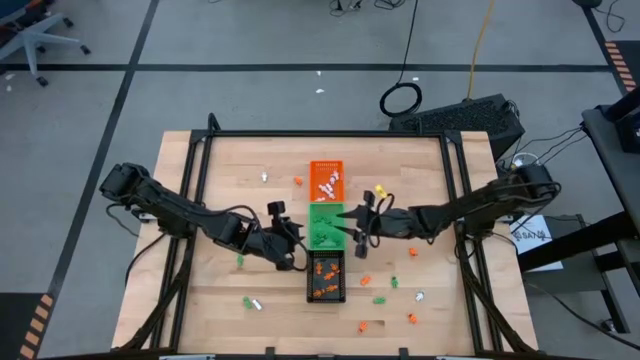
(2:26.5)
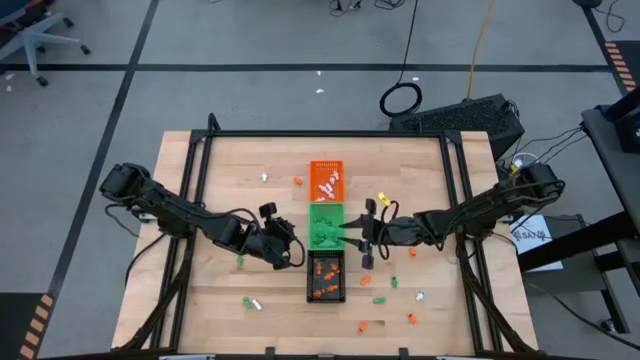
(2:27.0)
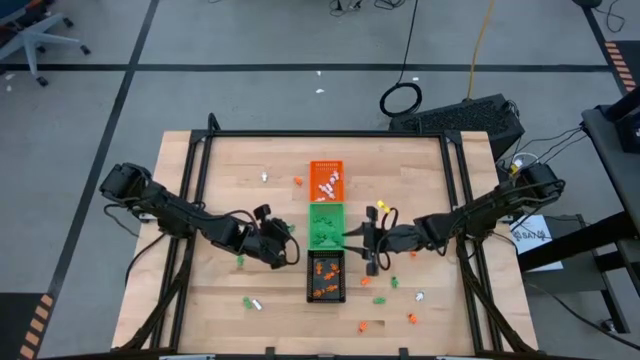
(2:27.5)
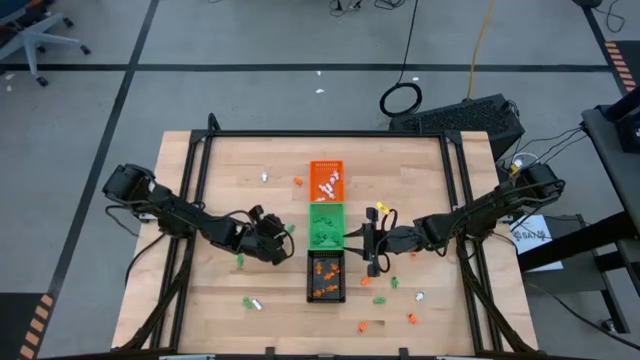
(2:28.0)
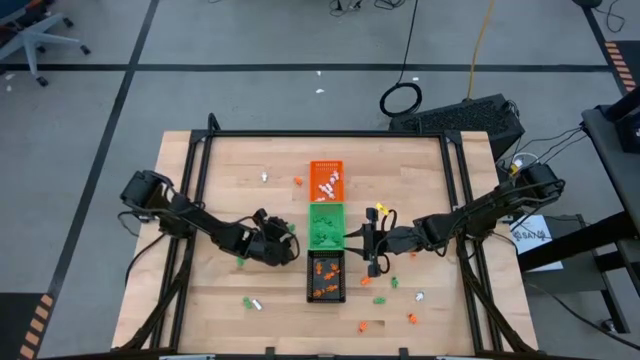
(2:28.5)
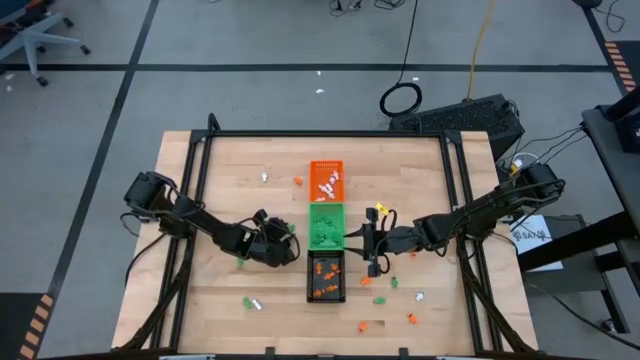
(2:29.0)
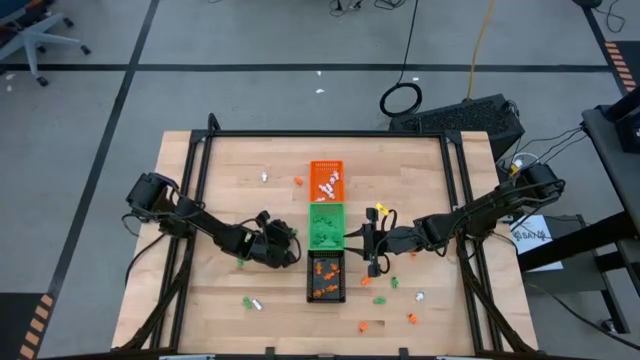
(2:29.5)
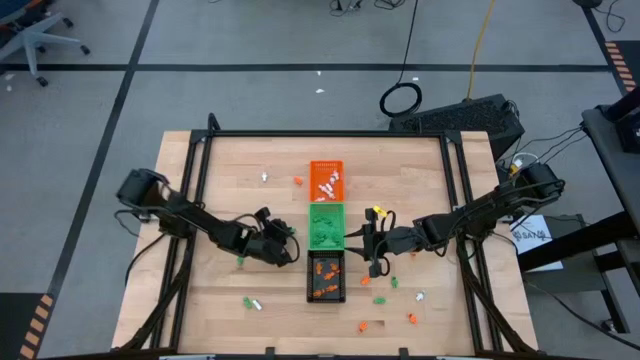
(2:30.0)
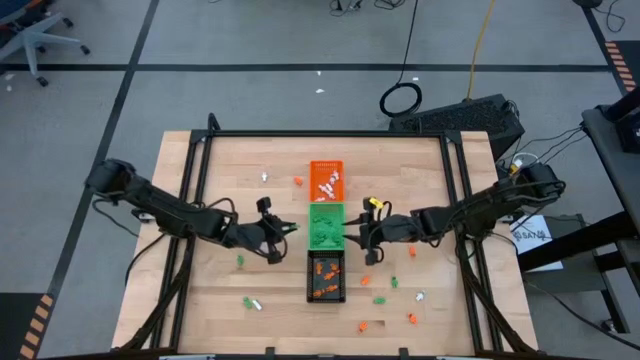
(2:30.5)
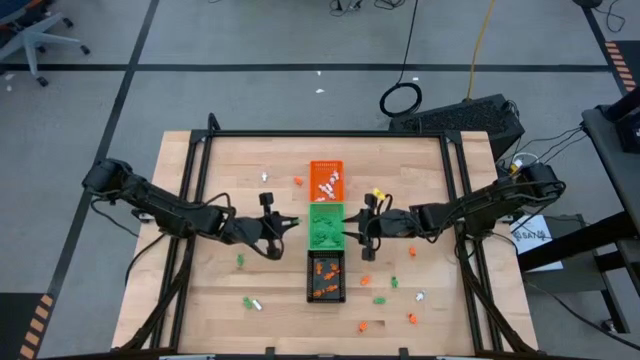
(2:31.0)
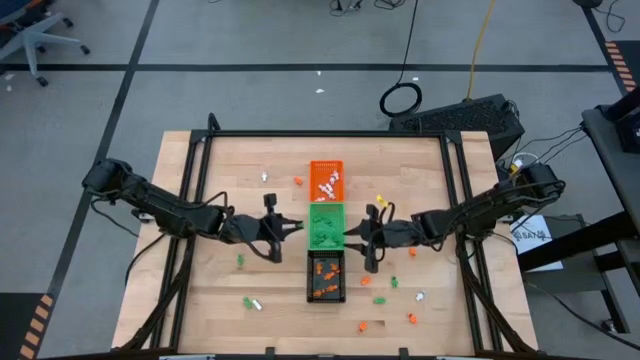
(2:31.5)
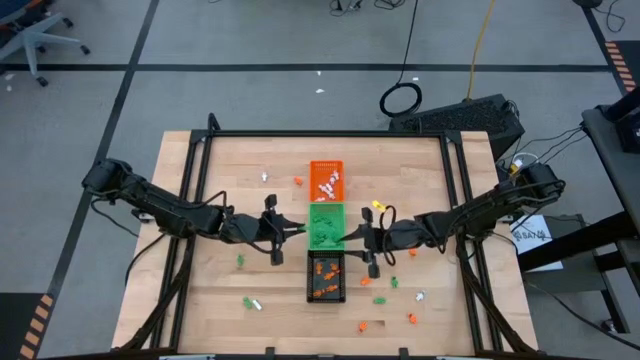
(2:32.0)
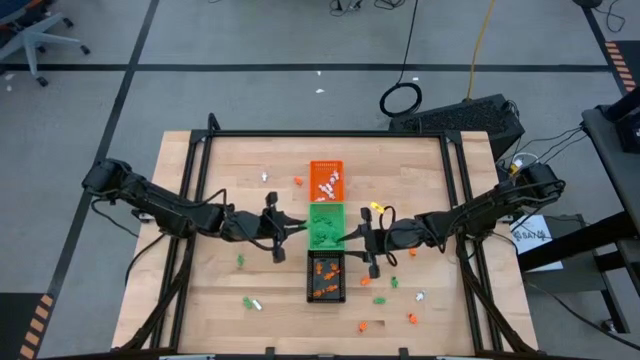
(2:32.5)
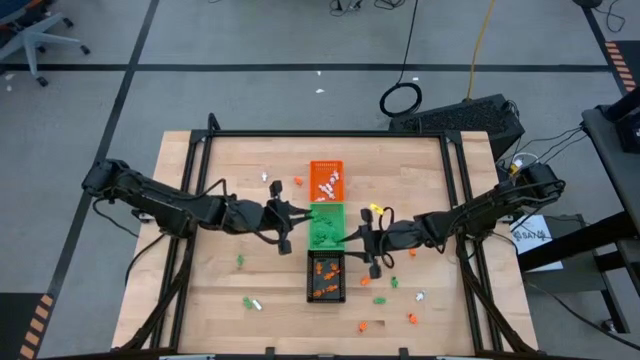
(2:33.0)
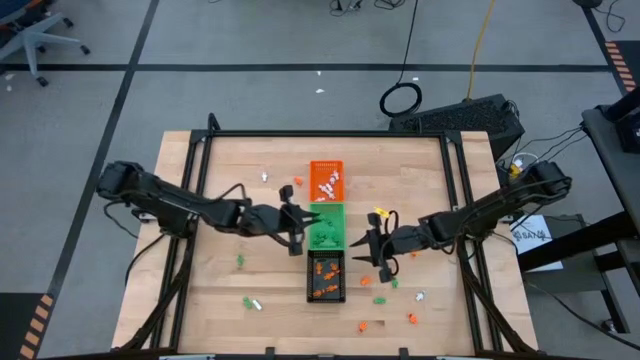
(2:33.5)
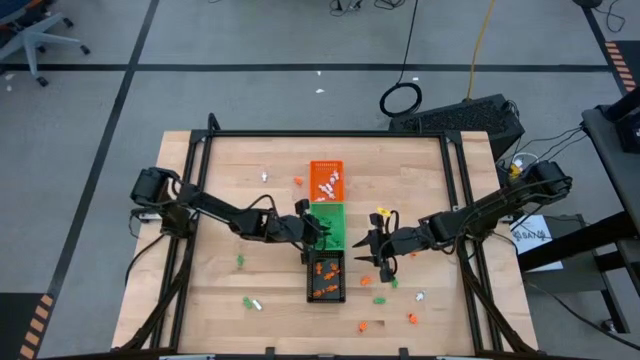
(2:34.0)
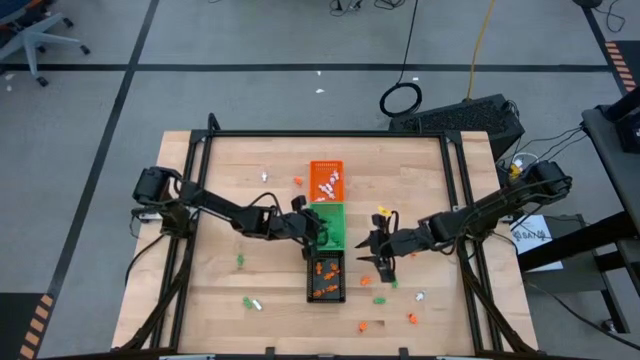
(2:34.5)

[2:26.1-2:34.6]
Task: Sort Halloween decoration
Put the green skeleton toy into the green bin

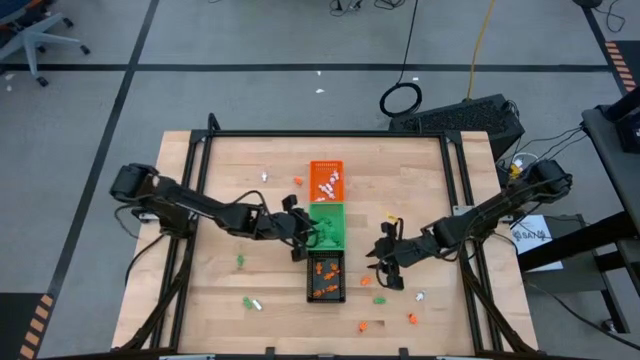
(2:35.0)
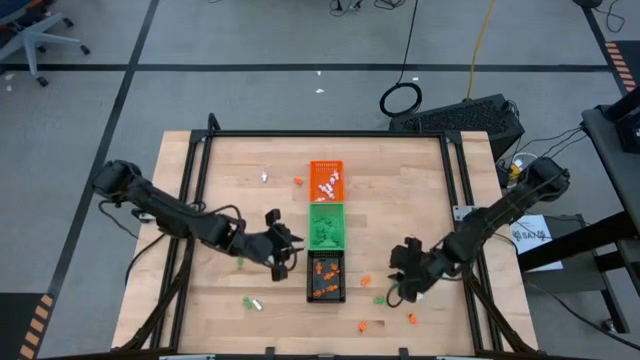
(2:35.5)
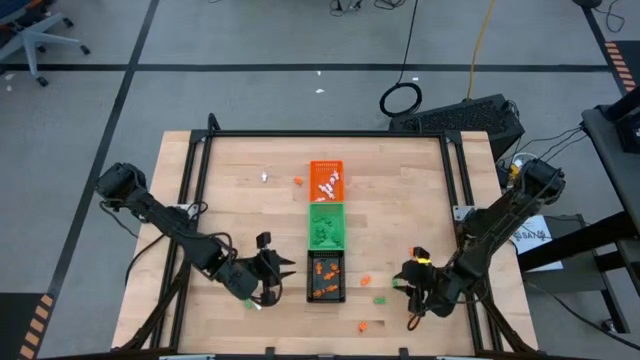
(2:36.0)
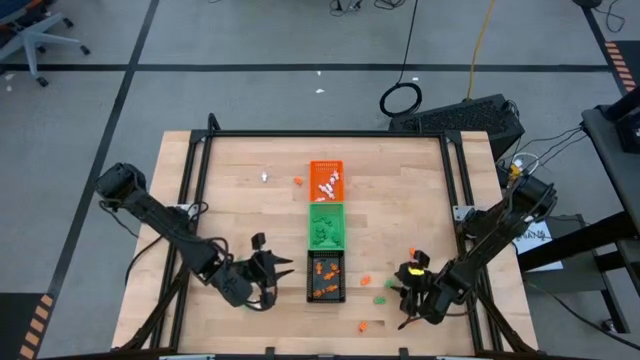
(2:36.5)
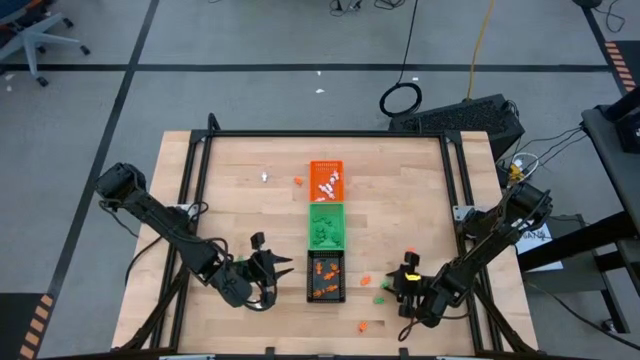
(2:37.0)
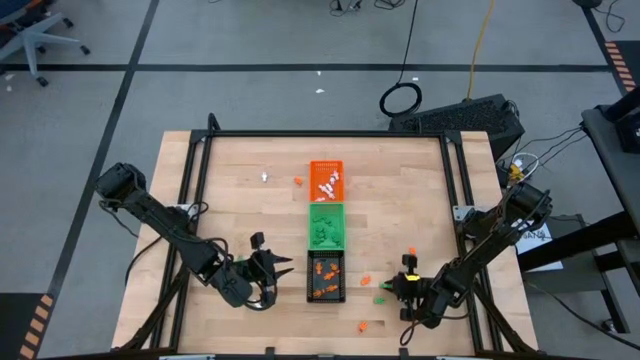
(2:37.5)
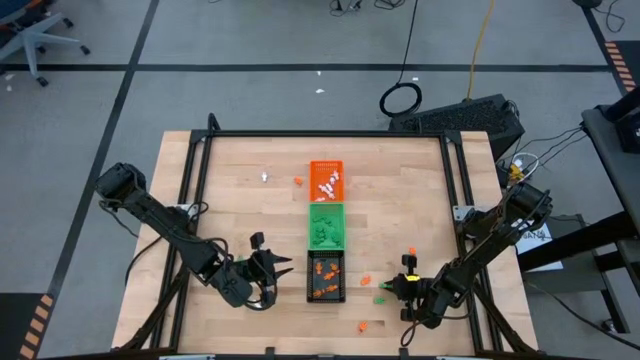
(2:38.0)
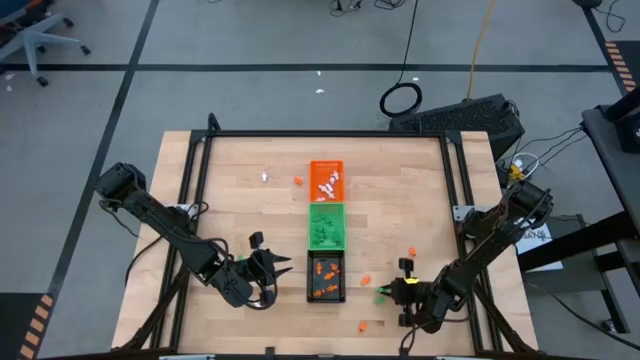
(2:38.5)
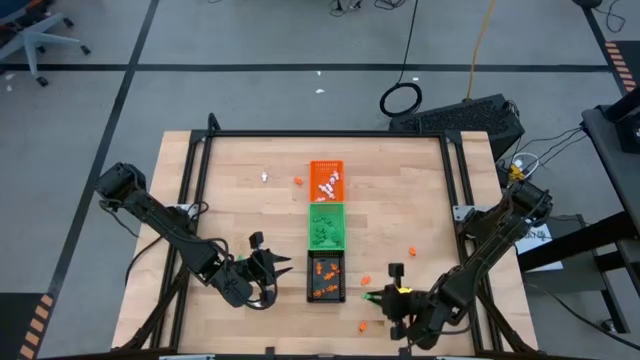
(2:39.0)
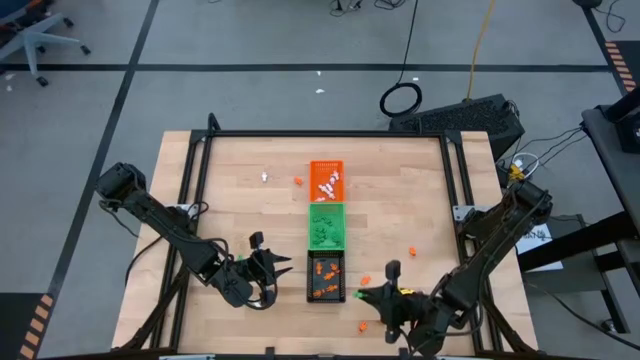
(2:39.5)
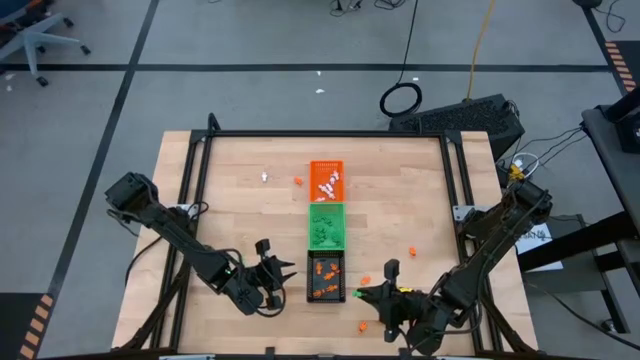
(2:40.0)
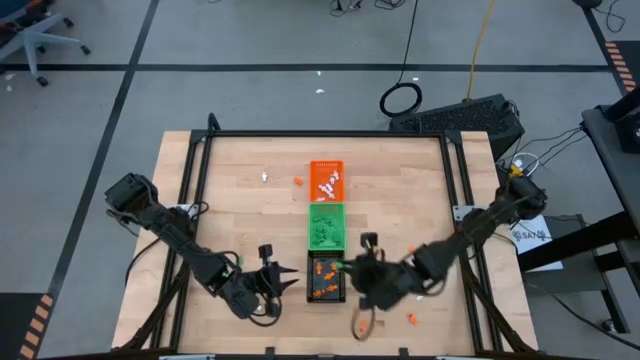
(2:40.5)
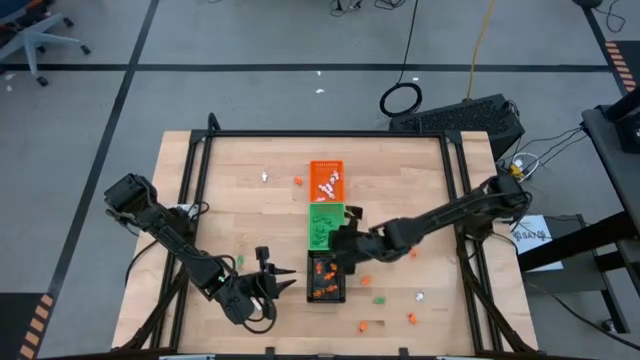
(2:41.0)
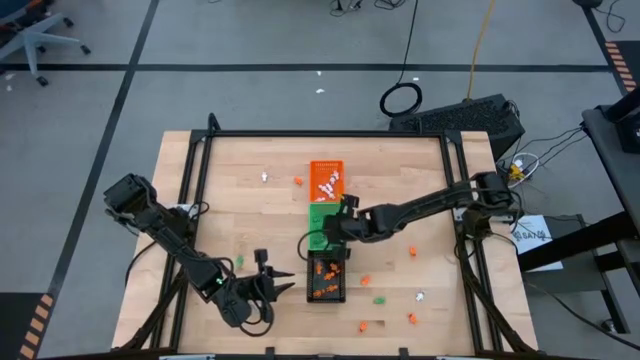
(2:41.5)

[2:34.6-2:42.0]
Put the green skeleton toy into the green bin

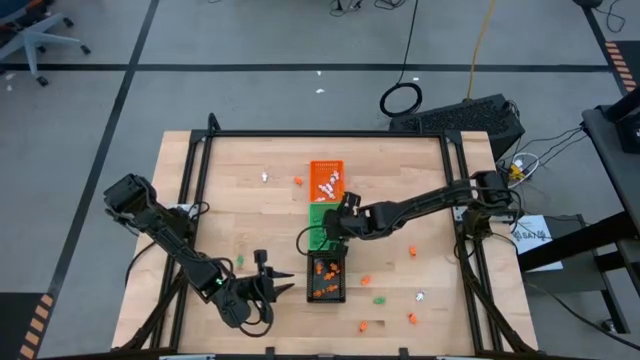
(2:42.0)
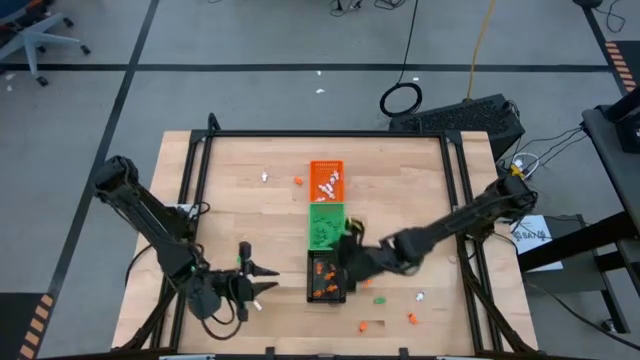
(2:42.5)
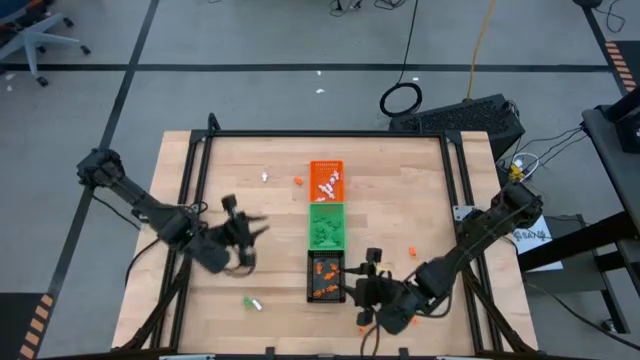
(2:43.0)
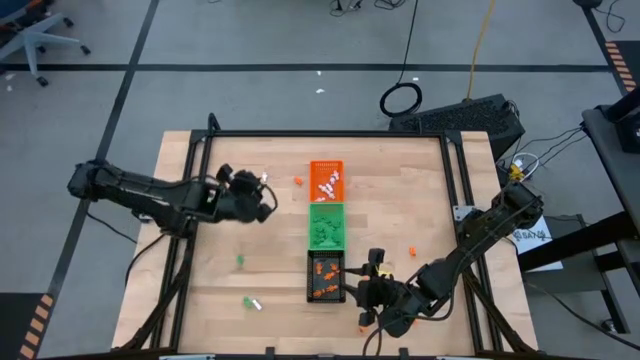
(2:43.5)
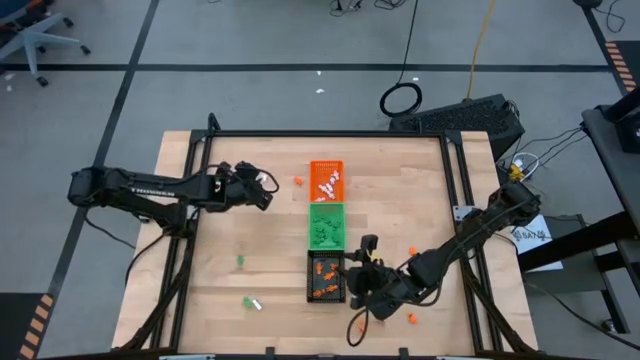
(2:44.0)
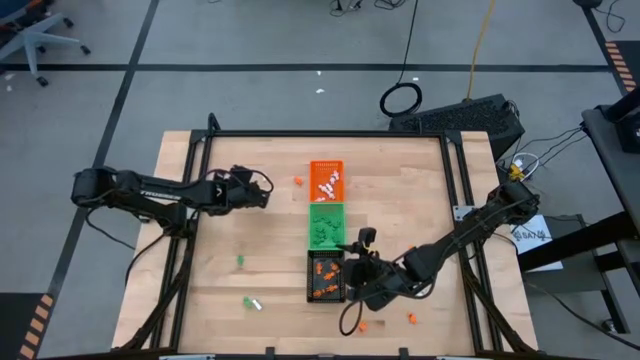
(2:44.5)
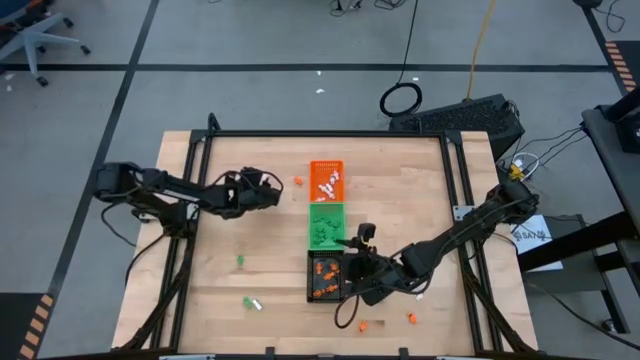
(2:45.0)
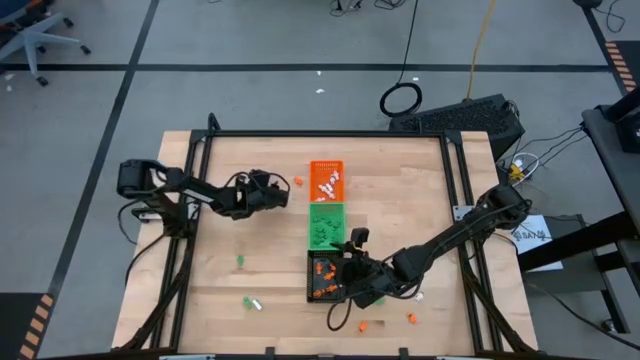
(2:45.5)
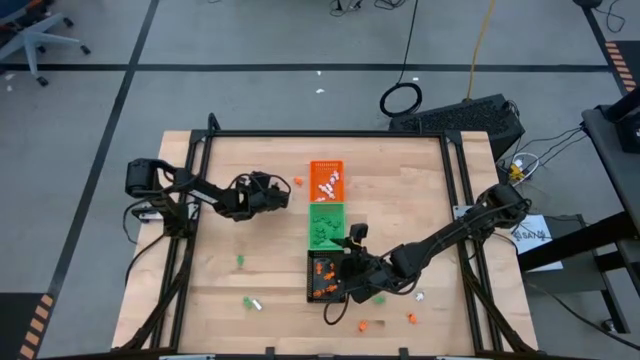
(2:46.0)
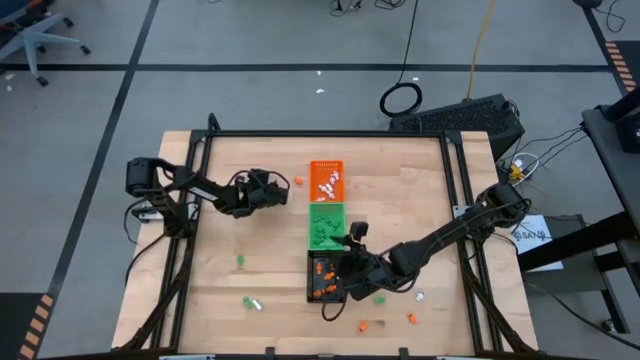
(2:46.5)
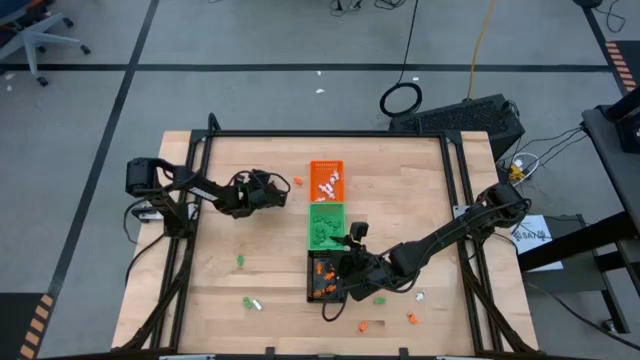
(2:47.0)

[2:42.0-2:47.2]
Put the white skeleton toy into the orange bin

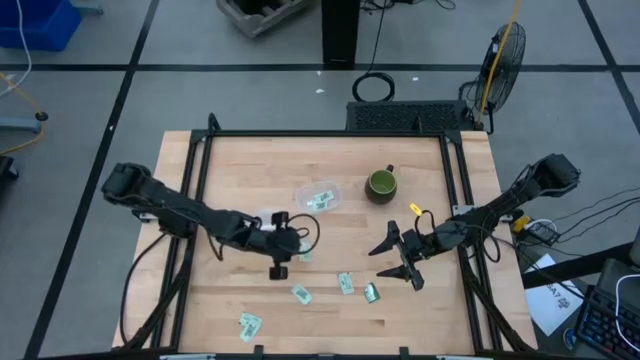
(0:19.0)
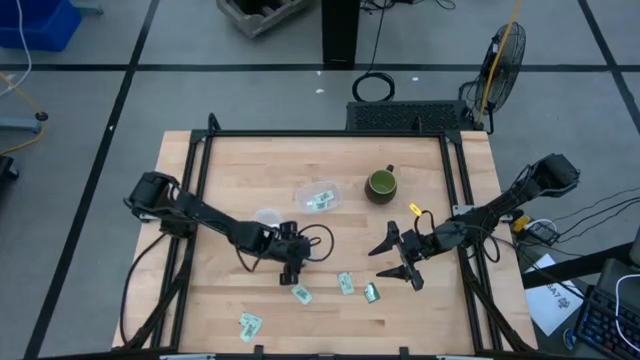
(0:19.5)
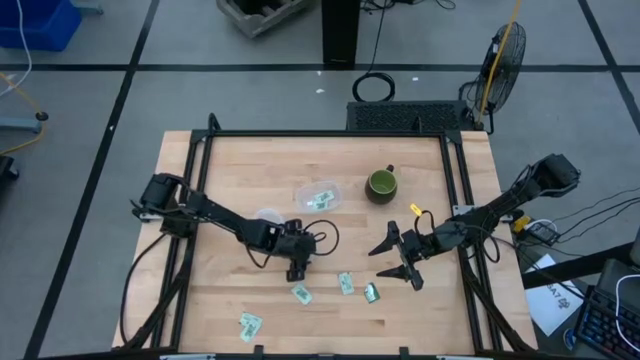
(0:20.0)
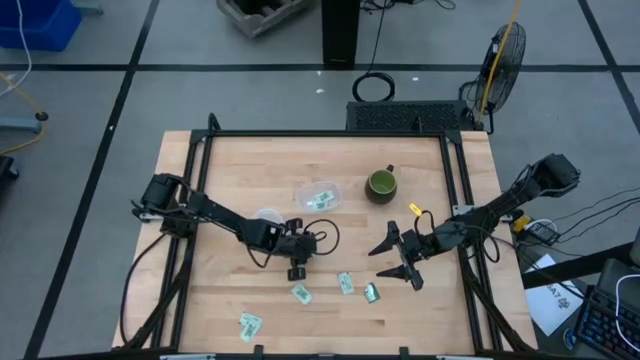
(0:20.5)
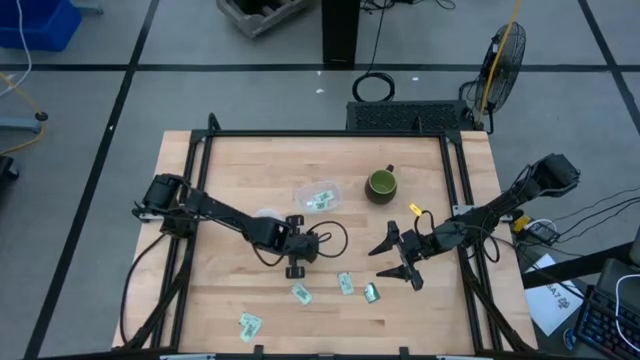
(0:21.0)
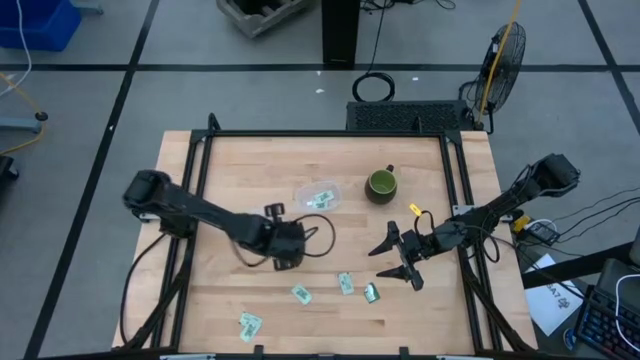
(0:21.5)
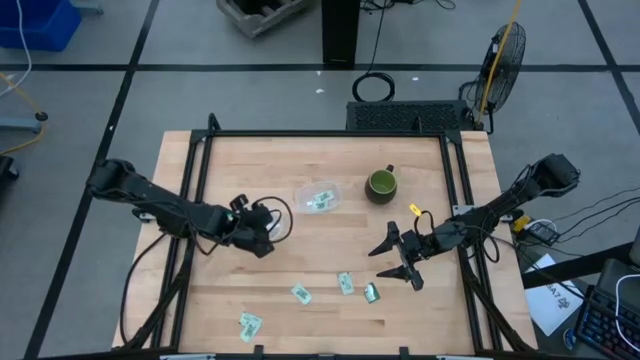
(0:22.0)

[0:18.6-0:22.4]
Task: Pick and place Stevia / Truvia into bins
Put the stevia packet into the round container
